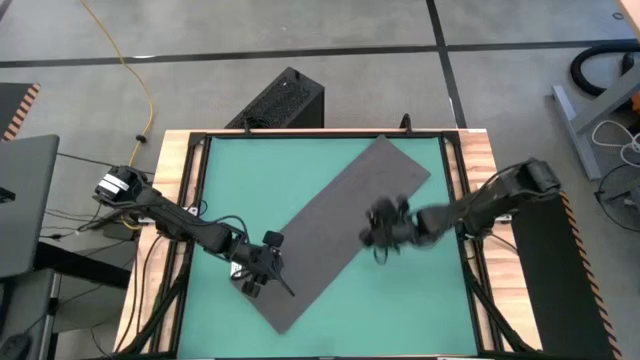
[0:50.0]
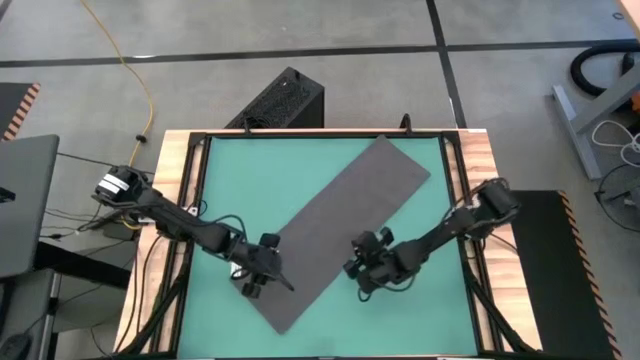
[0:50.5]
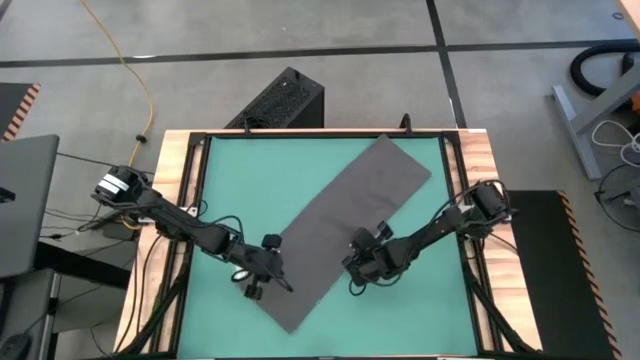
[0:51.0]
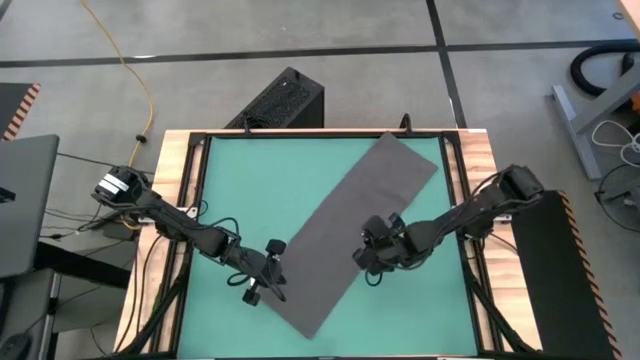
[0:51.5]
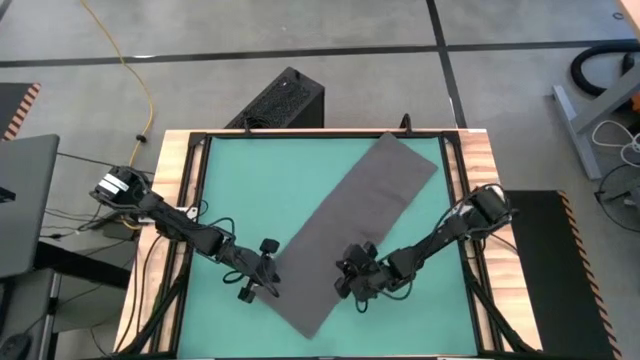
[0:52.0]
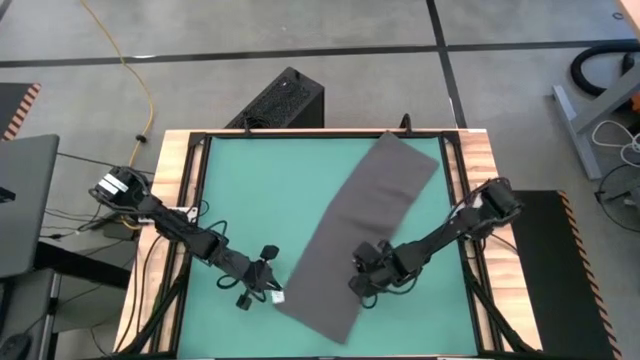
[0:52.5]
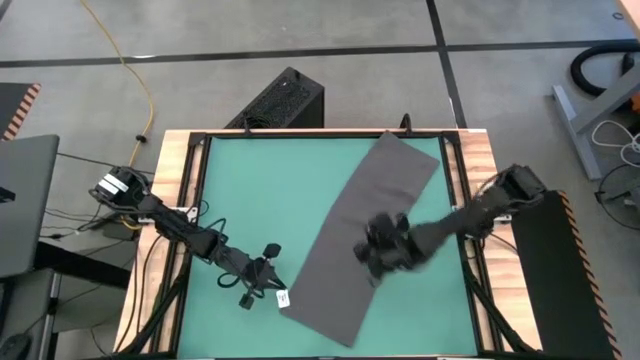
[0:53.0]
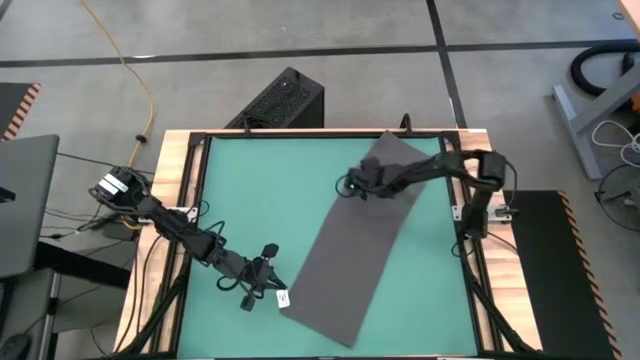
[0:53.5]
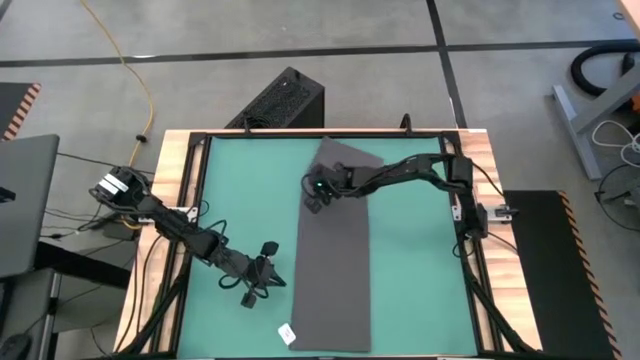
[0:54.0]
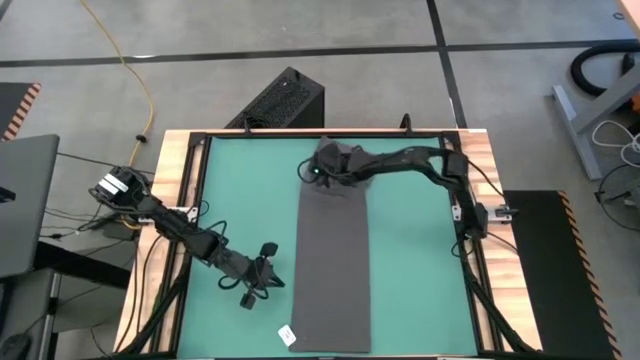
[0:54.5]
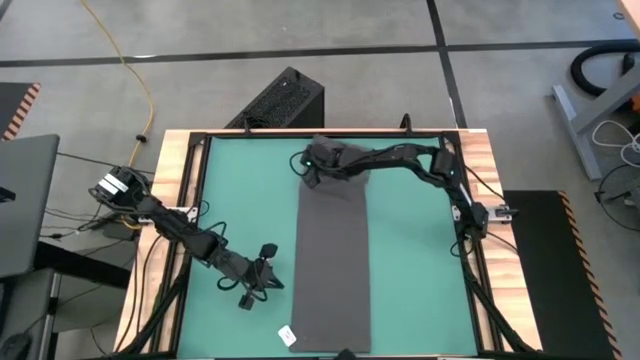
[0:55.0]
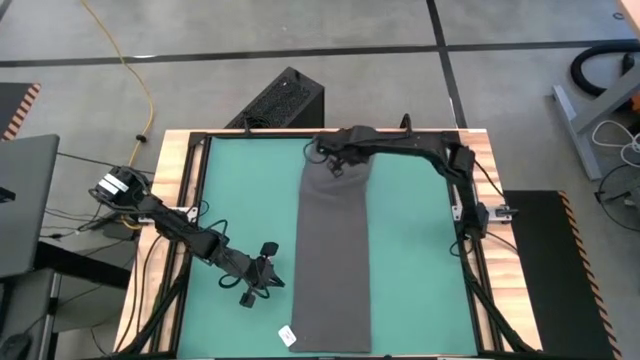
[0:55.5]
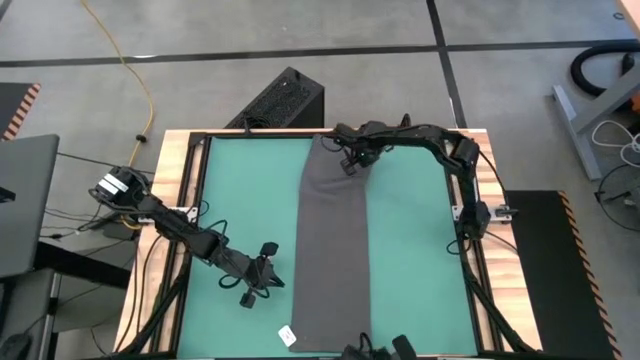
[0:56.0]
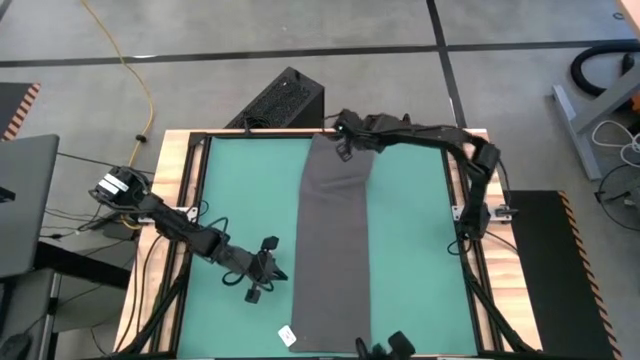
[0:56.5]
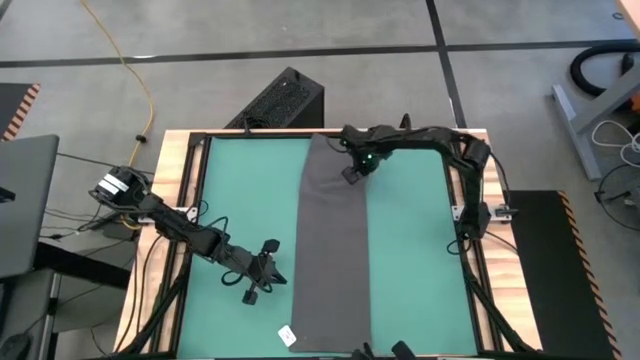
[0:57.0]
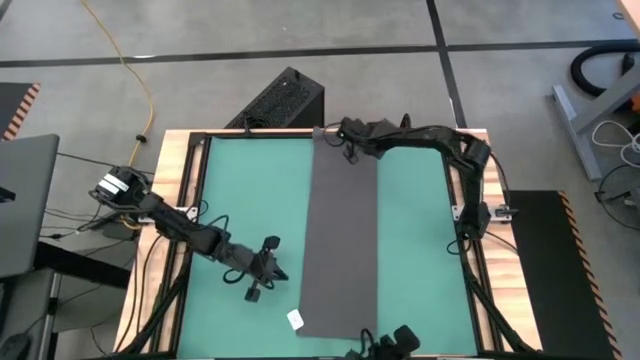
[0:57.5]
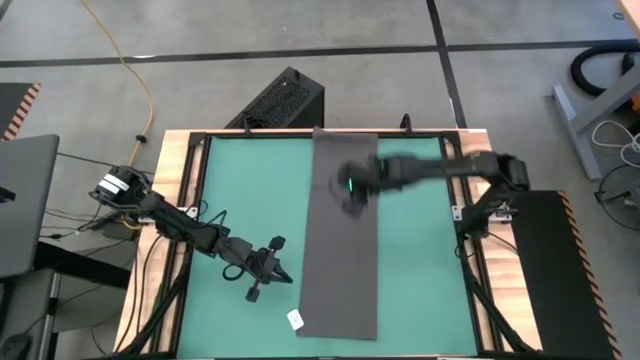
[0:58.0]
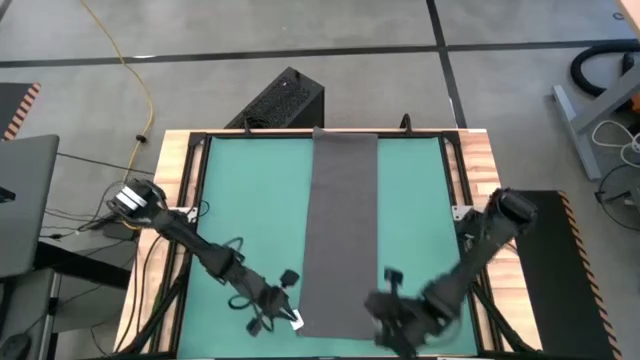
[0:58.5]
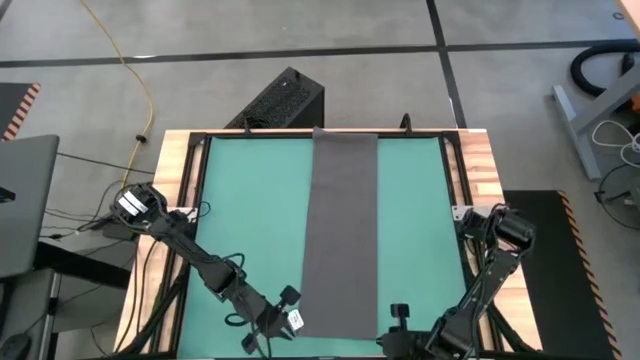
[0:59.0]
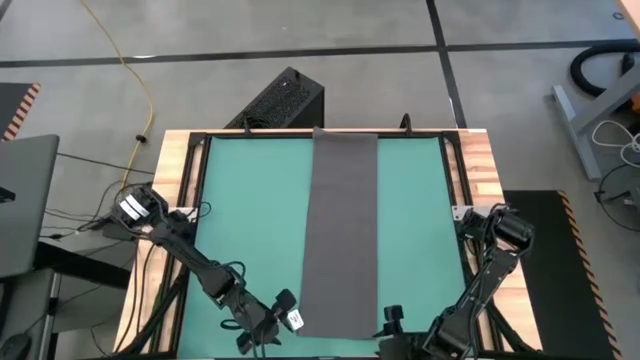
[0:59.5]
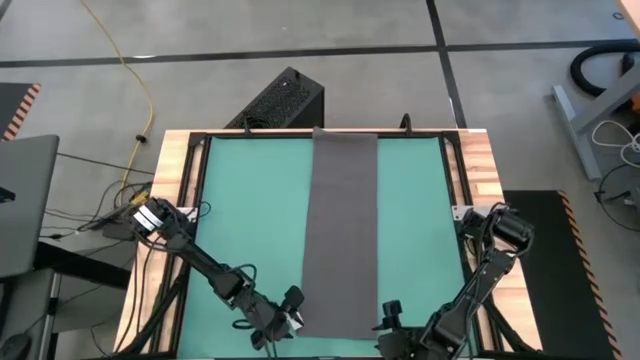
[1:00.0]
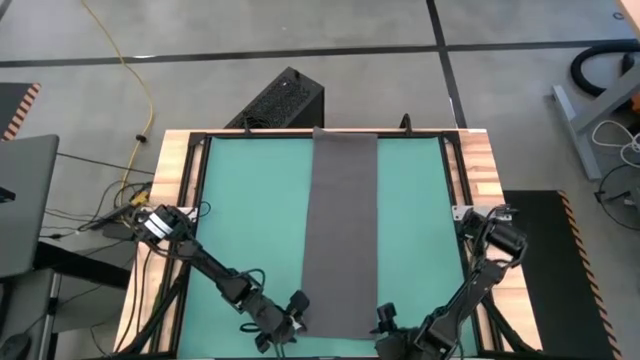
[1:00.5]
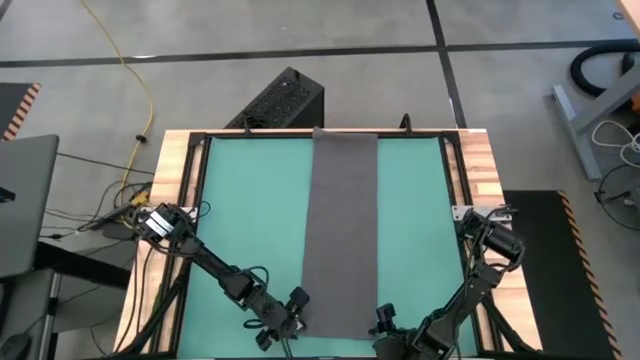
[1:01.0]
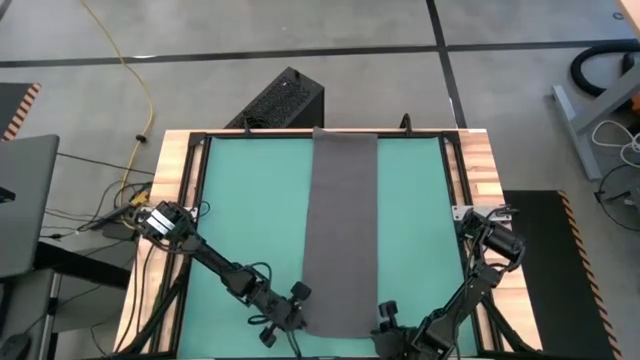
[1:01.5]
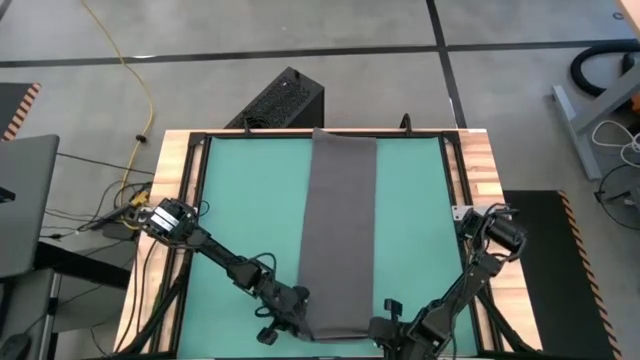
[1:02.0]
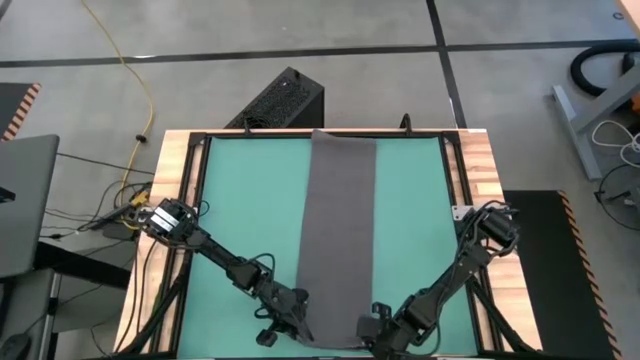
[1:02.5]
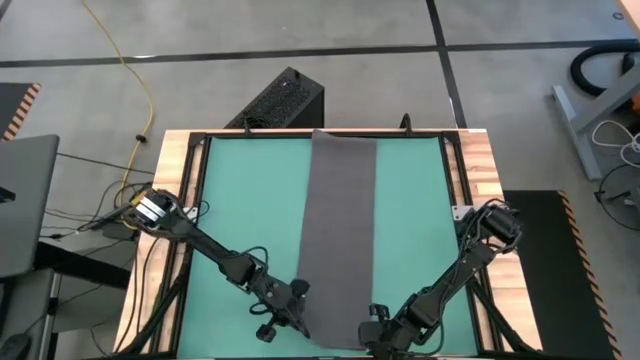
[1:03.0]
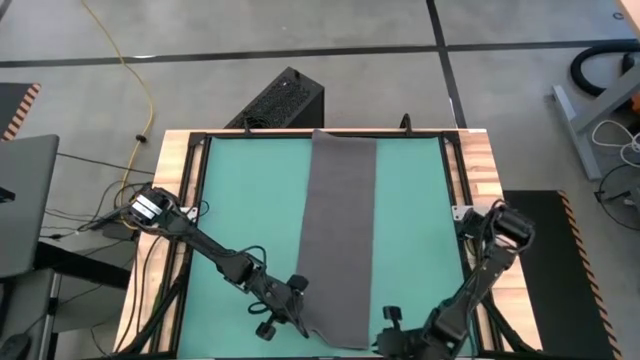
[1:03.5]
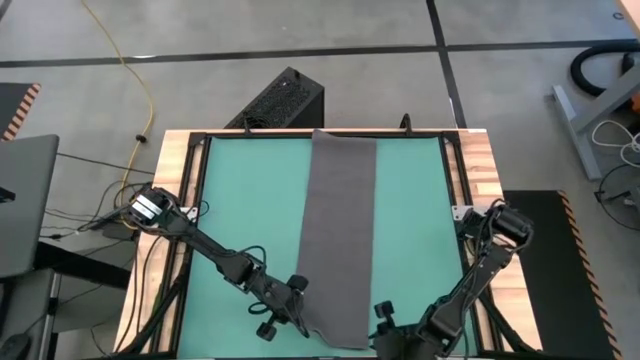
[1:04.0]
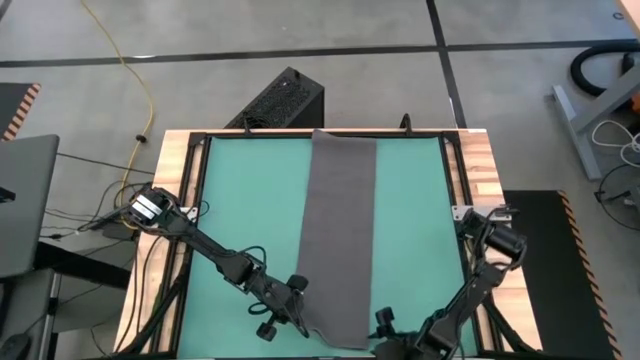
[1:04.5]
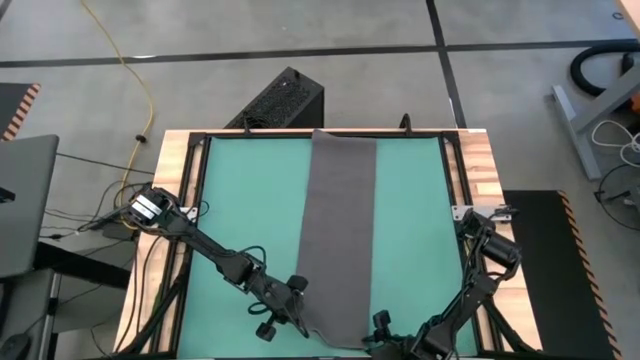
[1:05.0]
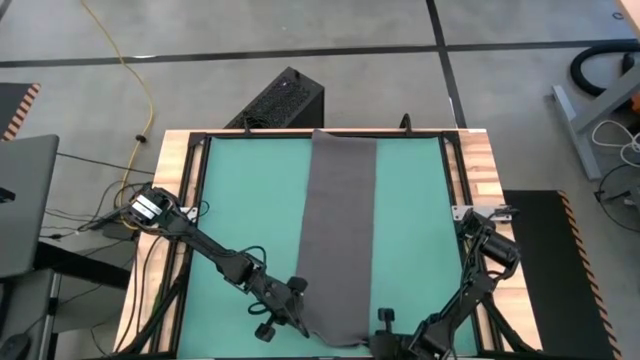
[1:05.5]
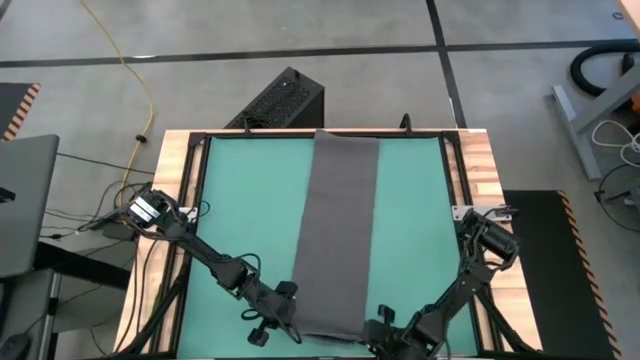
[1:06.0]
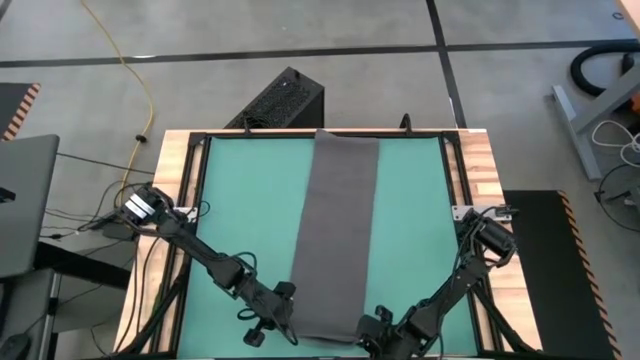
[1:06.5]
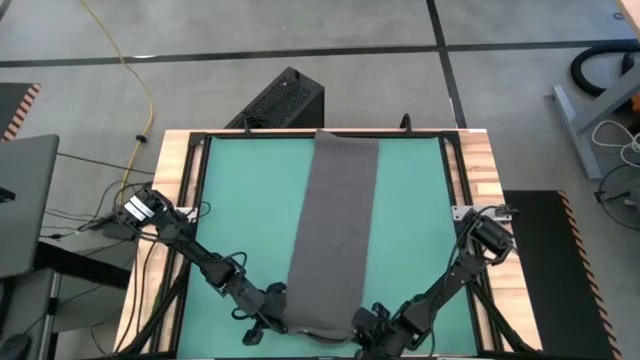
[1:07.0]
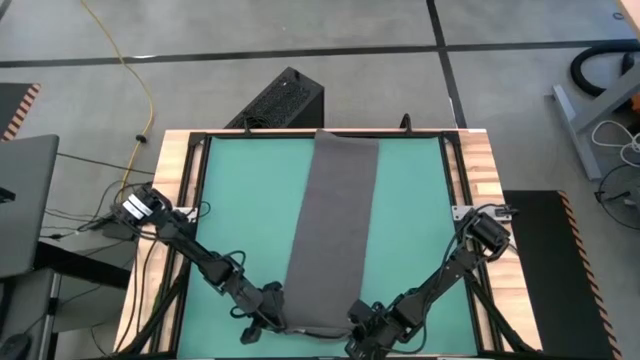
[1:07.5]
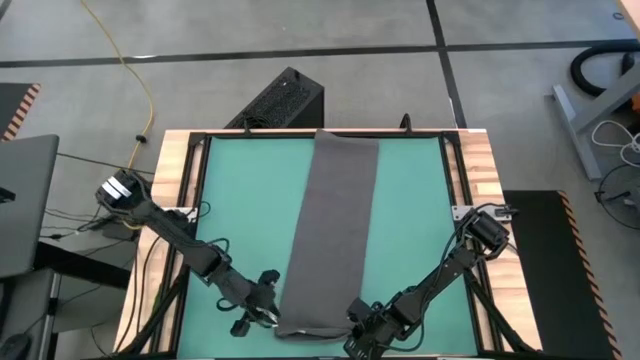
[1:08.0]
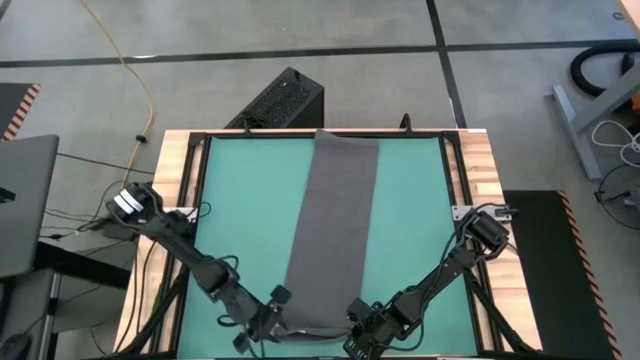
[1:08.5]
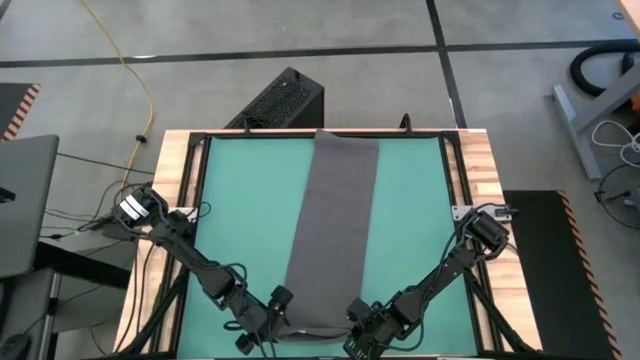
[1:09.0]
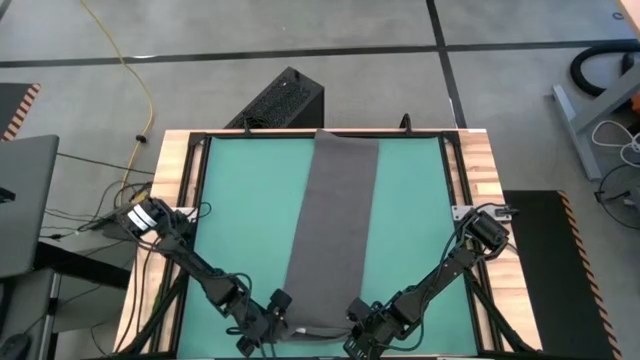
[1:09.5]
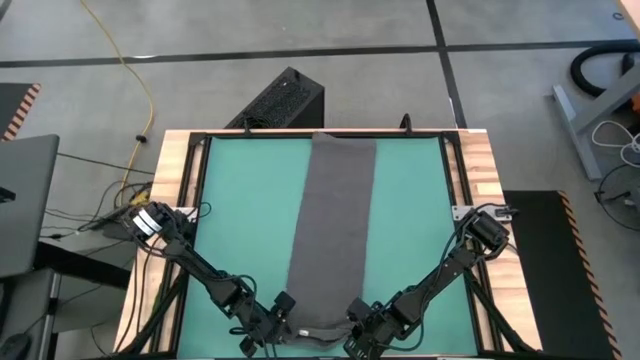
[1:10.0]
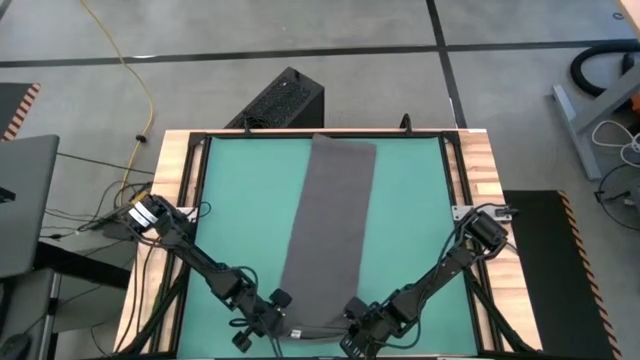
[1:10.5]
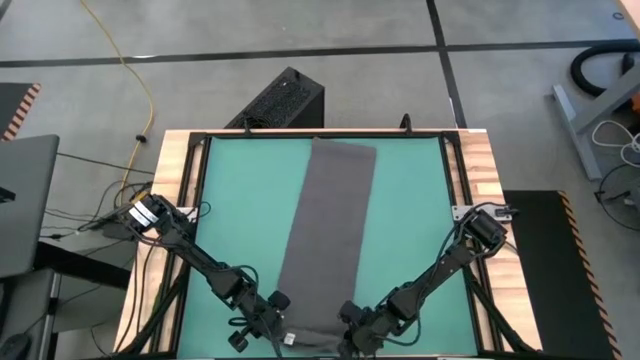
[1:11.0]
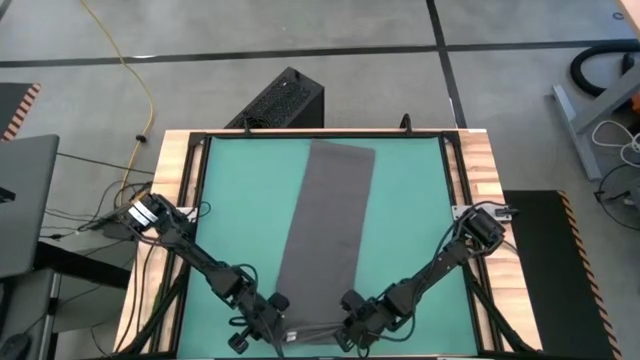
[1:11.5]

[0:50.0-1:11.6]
Task: Roll towel
Roll the gray towel

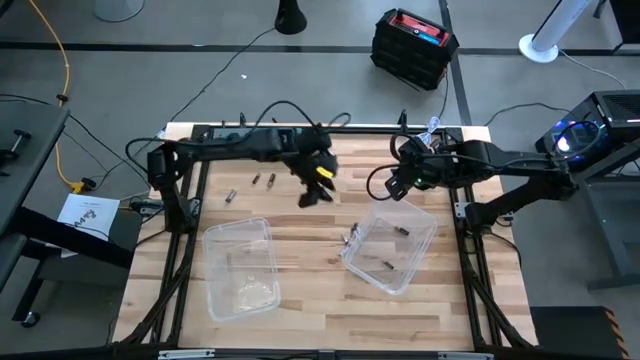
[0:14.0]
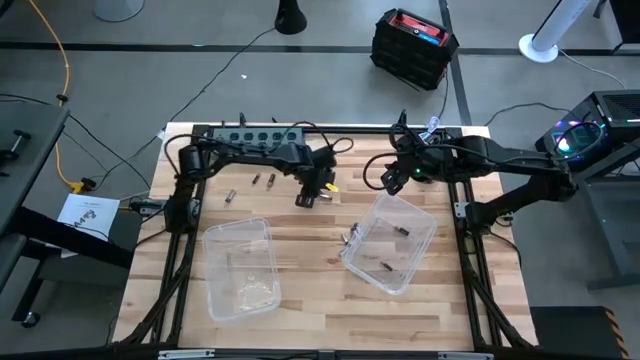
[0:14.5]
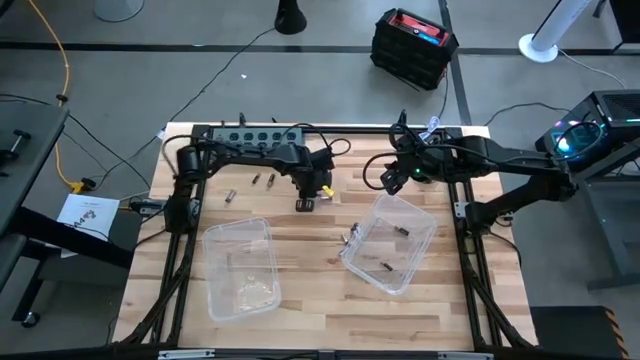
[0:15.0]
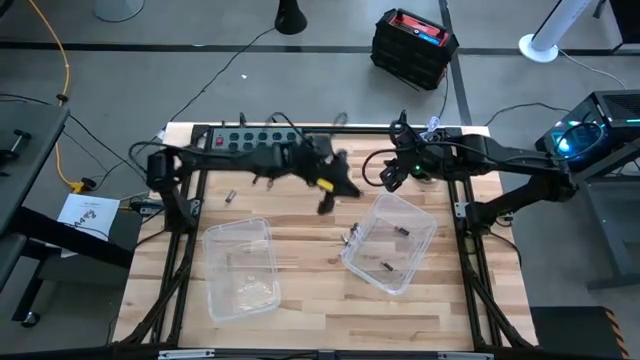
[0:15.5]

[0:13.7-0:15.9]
Task: Sort batteries
Put the black battery into the right transparent bin
